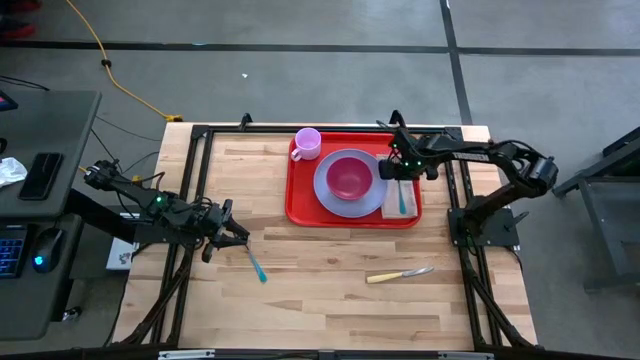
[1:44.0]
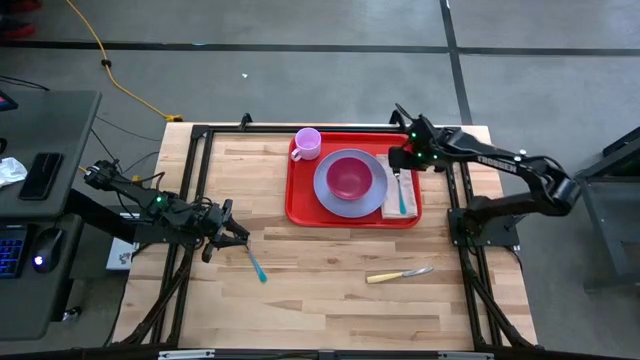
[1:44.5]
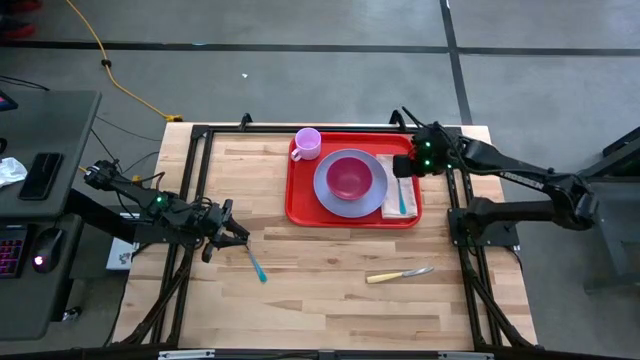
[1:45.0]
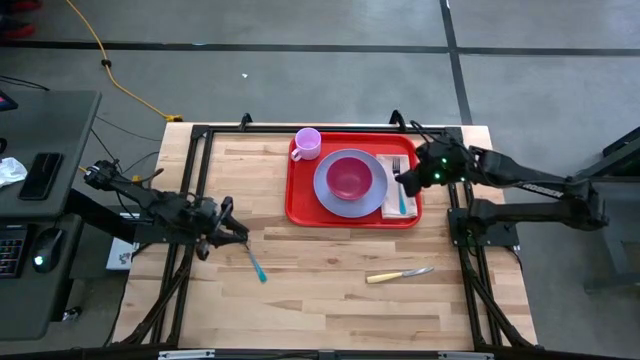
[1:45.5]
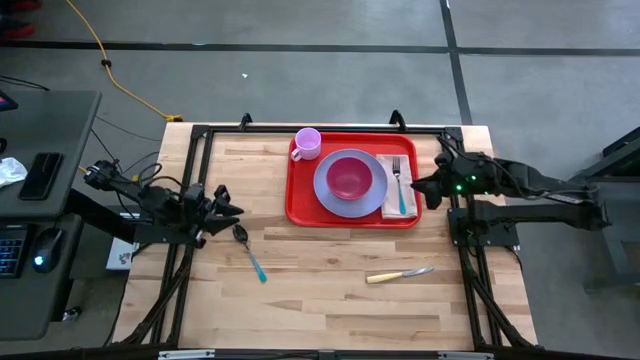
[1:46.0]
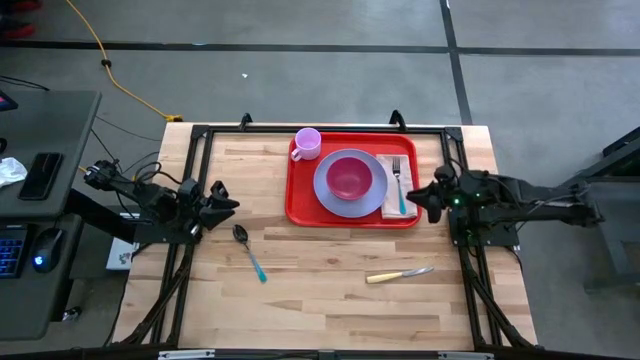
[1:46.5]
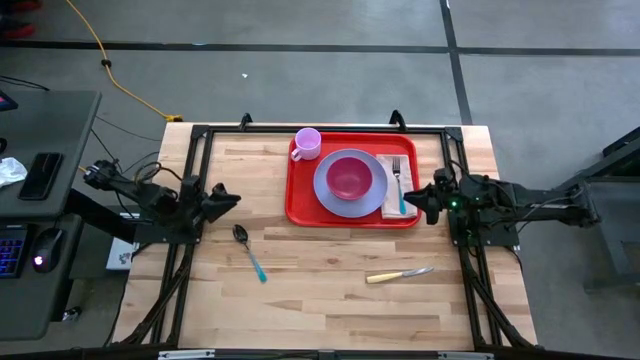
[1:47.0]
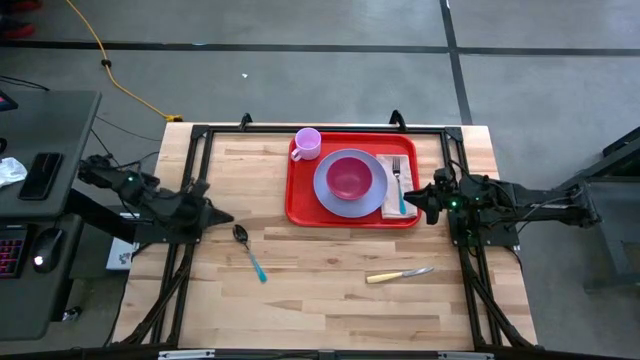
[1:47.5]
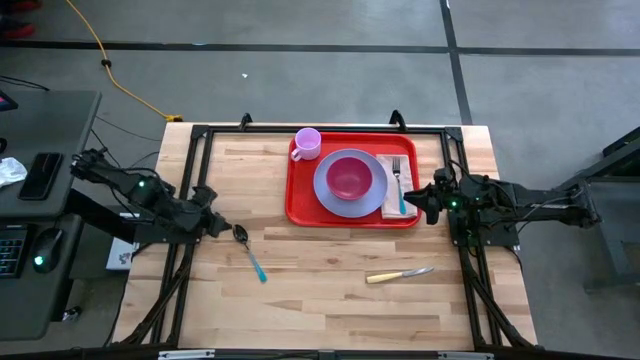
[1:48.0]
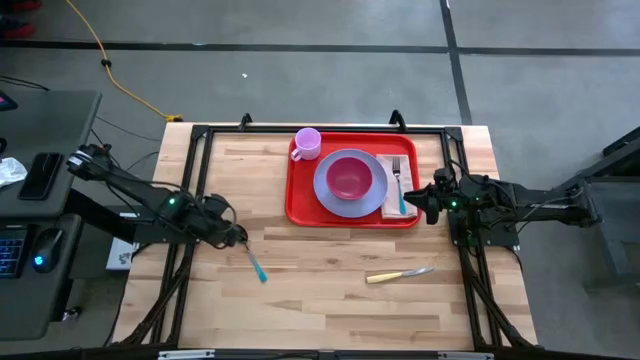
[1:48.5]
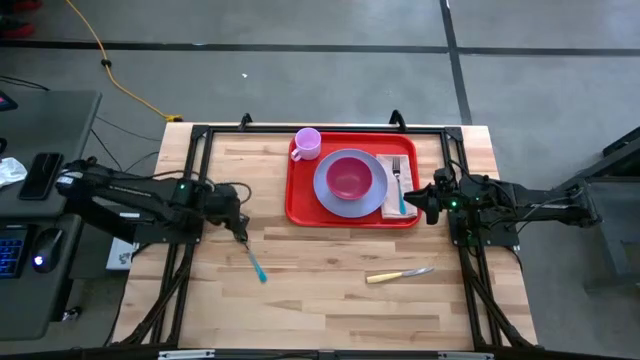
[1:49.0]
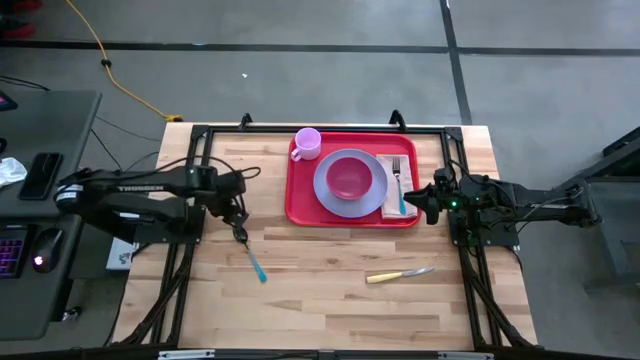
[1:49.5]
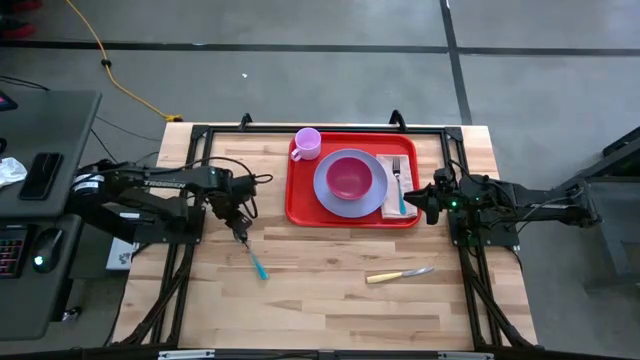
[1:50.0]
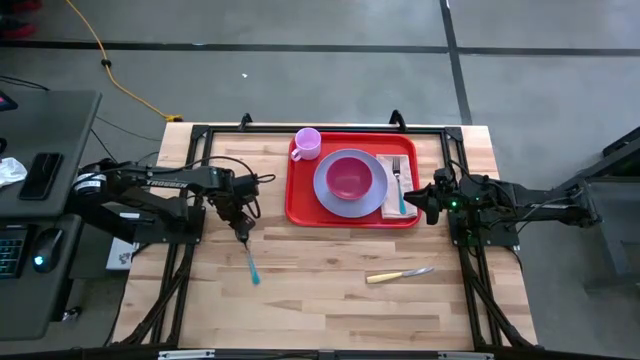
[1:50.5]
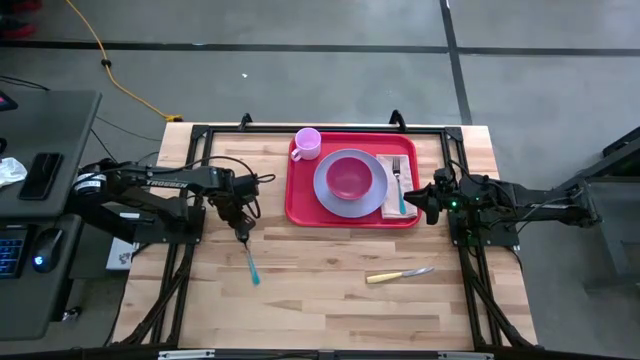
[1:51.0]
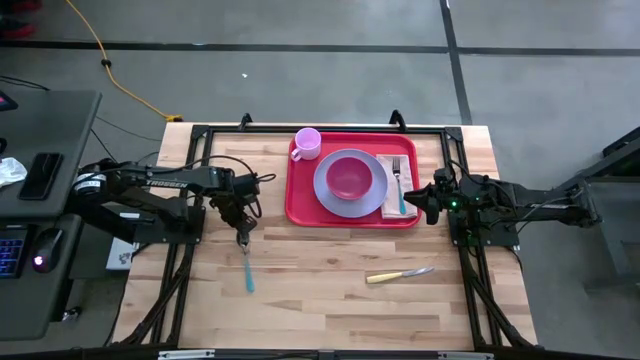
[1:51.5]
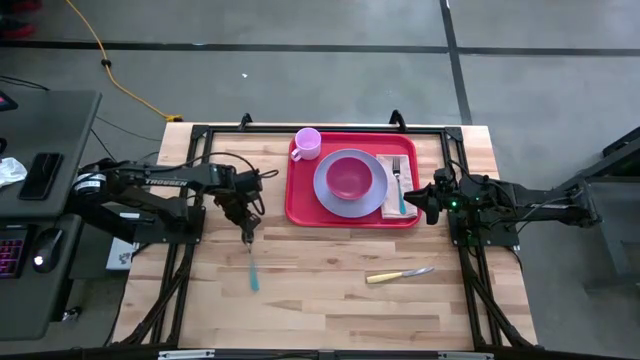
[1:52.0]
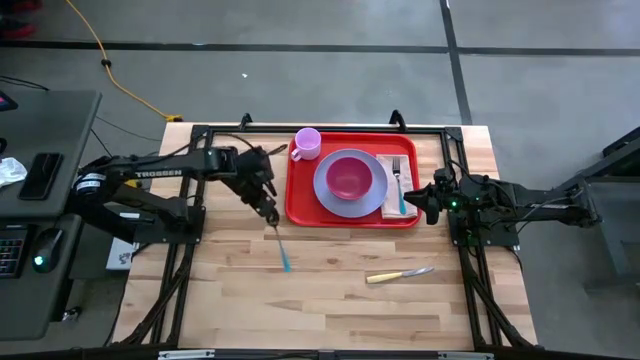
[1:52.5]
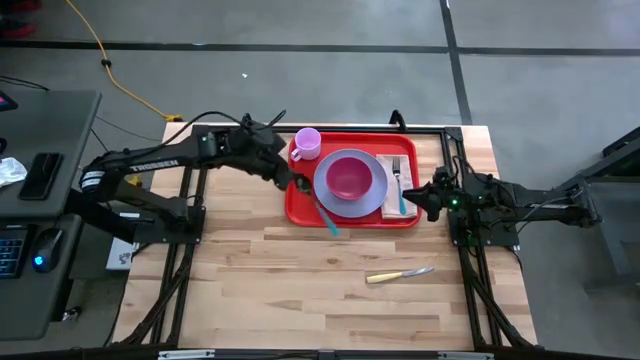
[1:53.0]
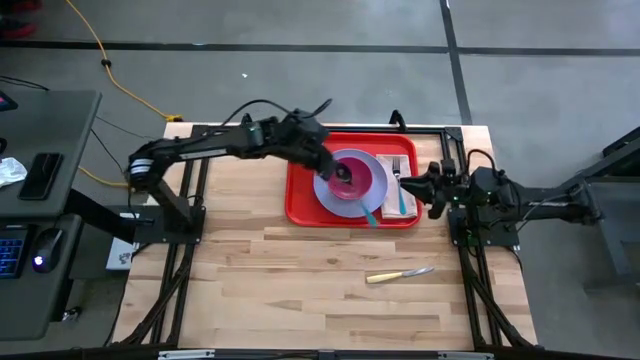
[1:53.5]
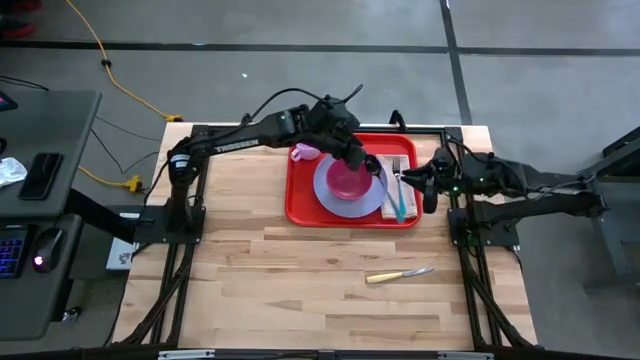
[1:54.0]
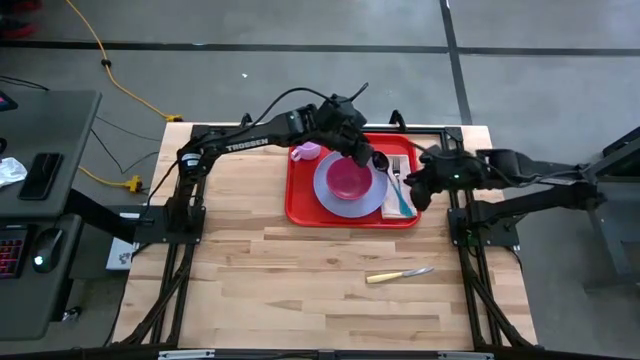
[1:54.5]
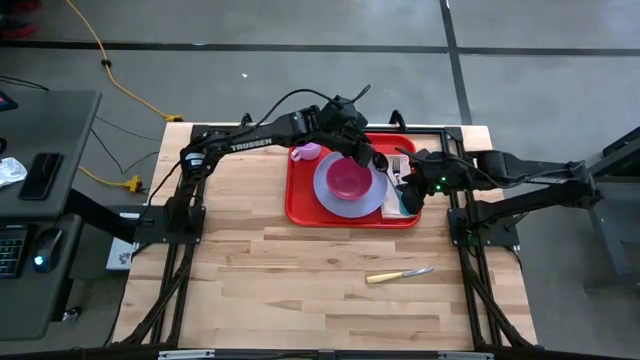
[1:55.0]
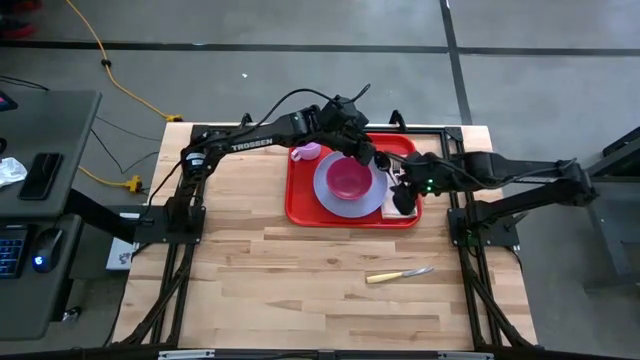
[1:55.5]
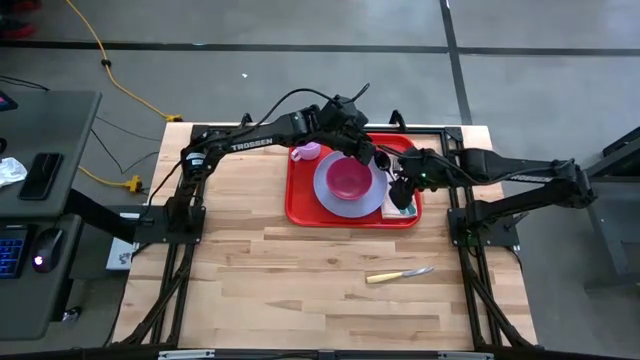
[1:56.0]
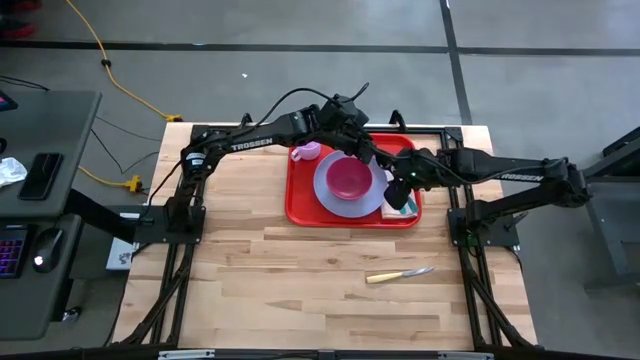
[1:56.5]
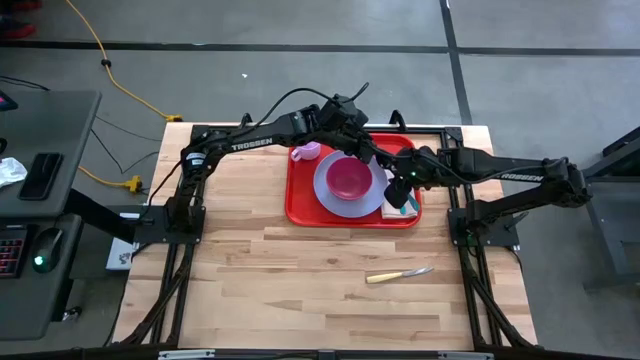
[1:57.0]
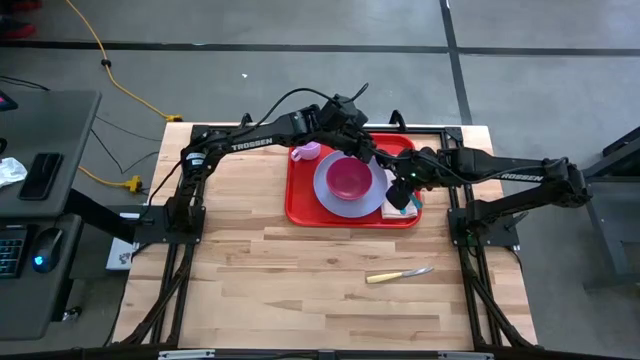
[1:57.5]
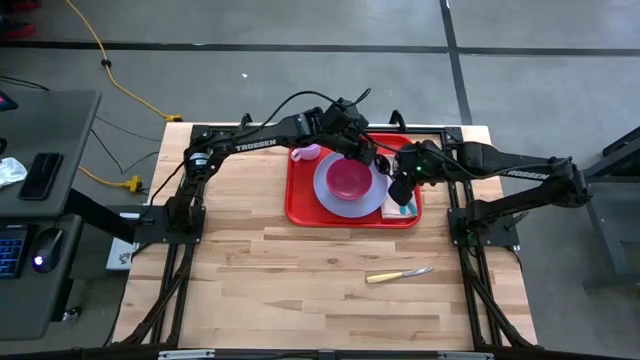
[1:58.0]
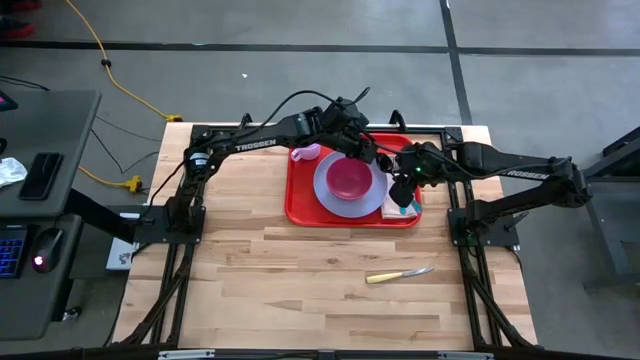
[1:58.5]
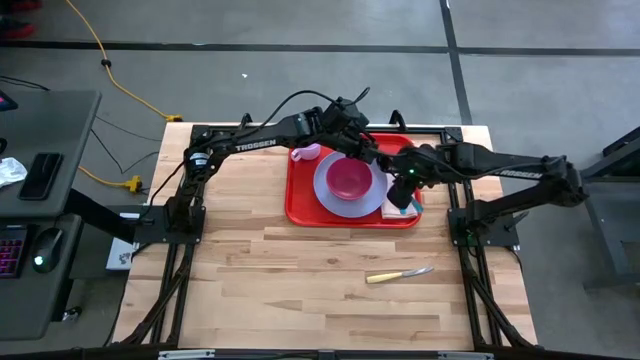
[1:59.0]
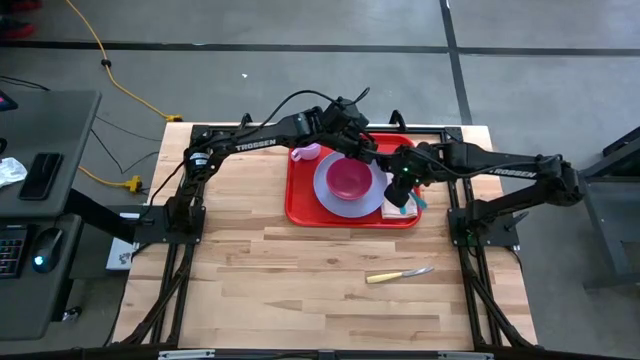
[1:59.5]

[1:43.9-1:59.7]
Task: Set up tray
Put the blue spoon on the left of the blue fork on the white napkin on the red serving tray
